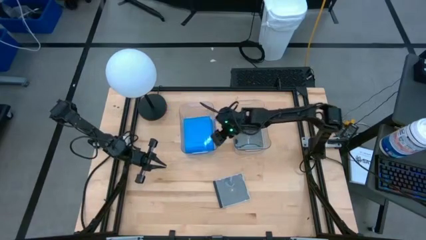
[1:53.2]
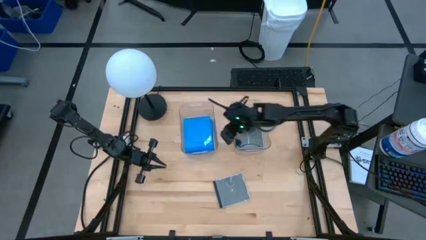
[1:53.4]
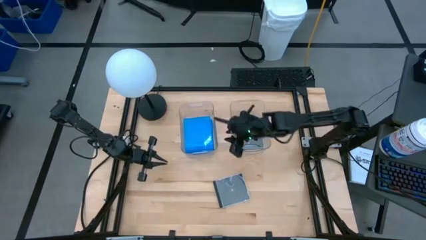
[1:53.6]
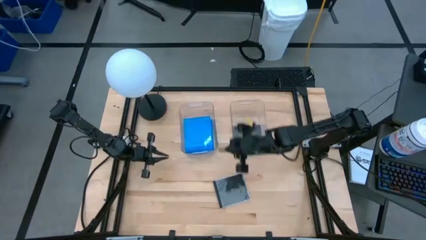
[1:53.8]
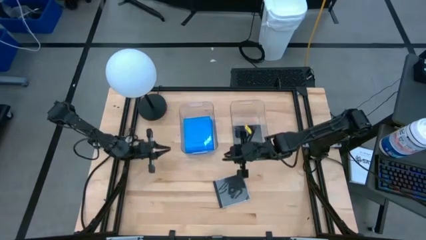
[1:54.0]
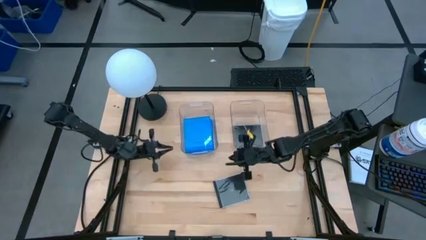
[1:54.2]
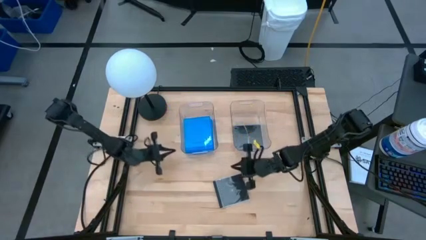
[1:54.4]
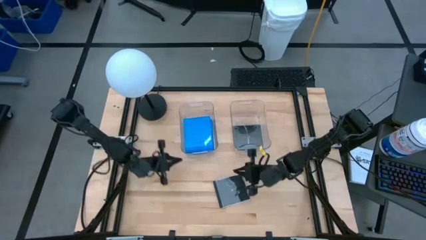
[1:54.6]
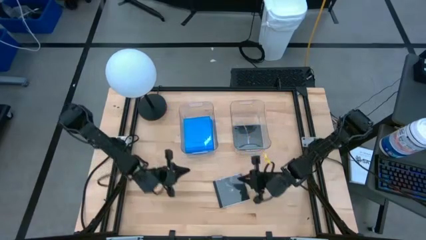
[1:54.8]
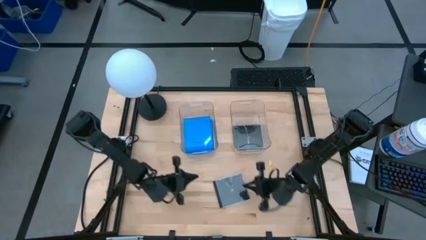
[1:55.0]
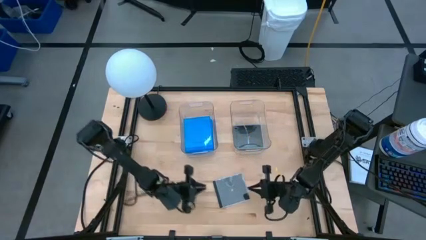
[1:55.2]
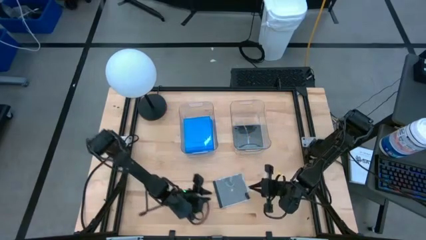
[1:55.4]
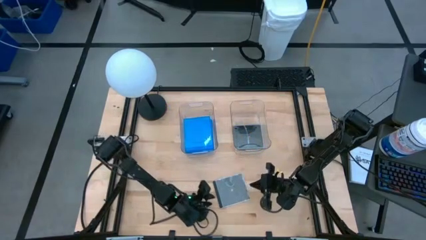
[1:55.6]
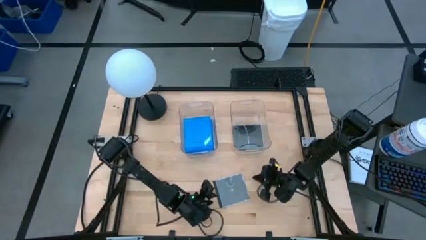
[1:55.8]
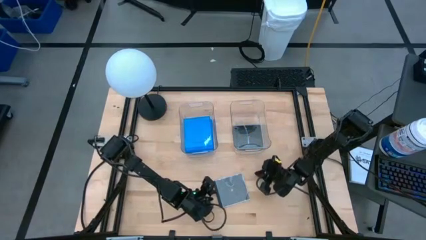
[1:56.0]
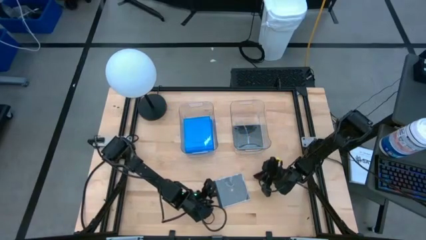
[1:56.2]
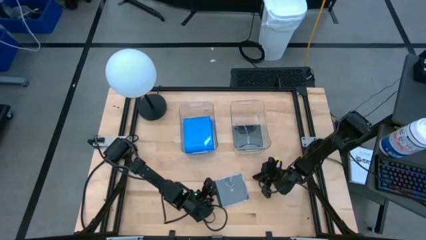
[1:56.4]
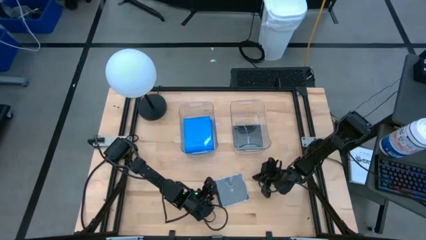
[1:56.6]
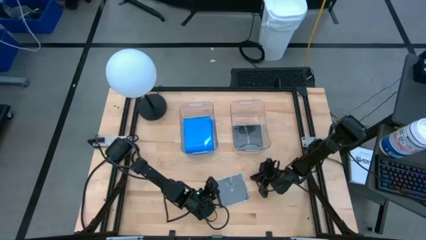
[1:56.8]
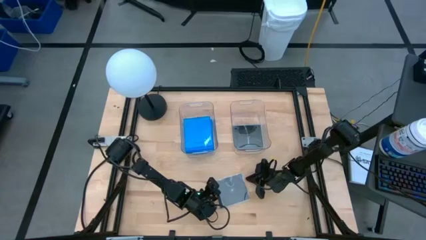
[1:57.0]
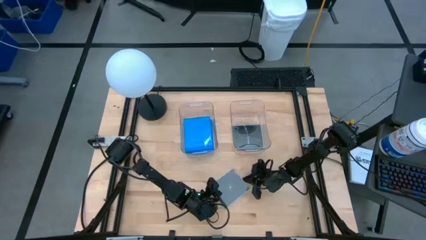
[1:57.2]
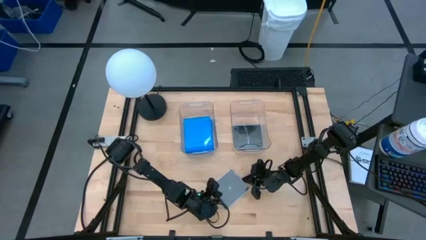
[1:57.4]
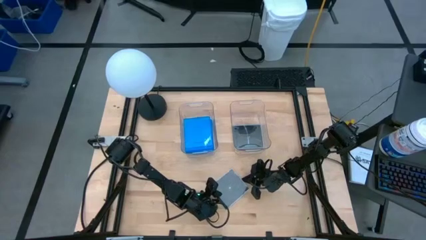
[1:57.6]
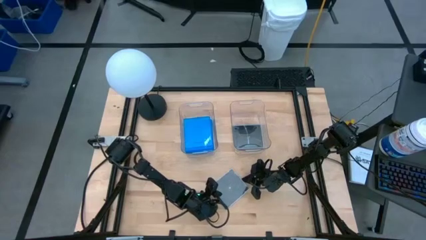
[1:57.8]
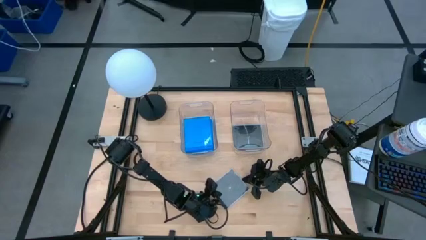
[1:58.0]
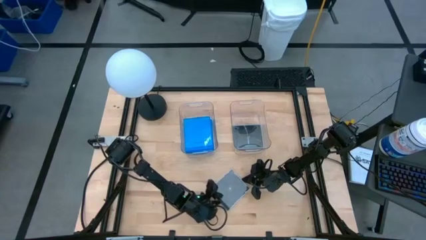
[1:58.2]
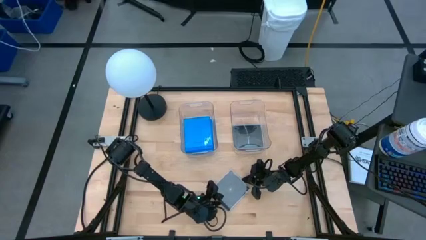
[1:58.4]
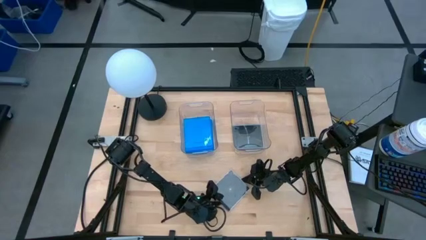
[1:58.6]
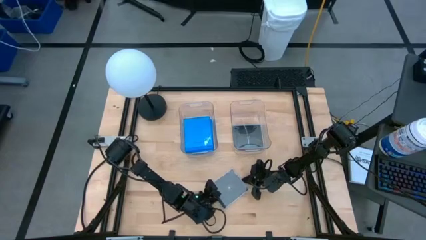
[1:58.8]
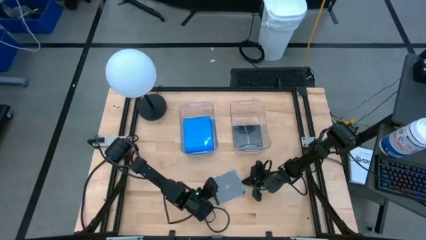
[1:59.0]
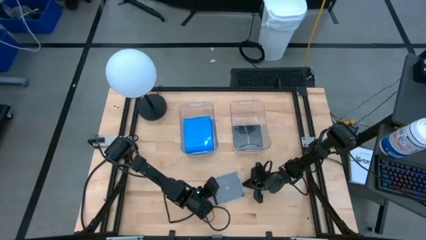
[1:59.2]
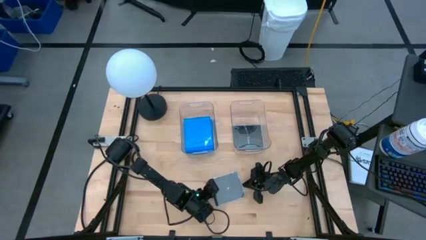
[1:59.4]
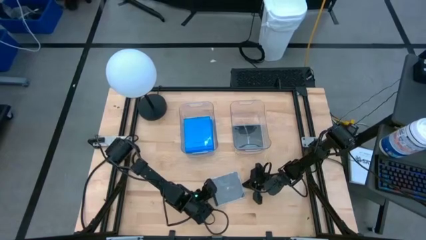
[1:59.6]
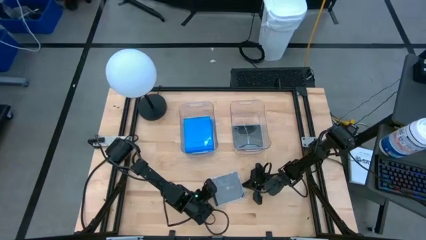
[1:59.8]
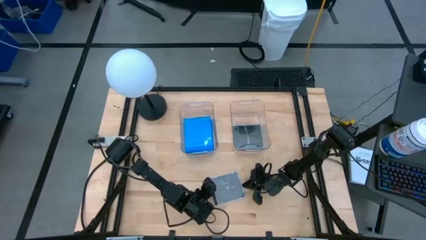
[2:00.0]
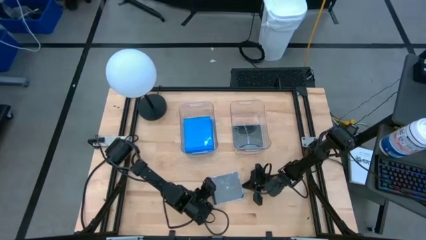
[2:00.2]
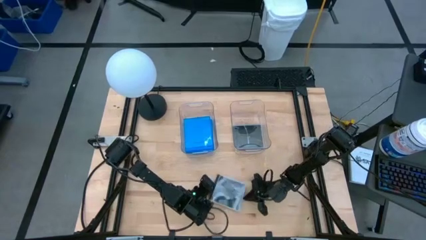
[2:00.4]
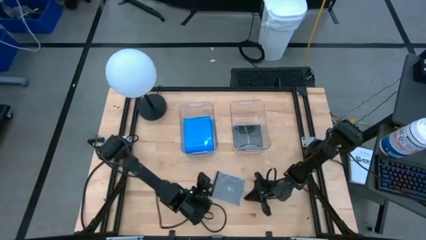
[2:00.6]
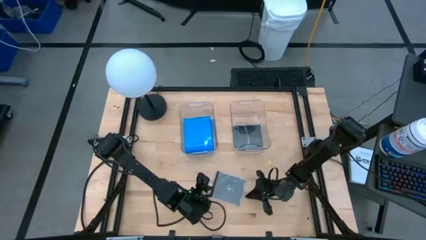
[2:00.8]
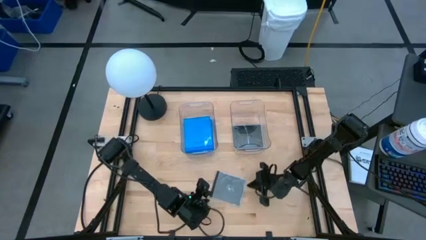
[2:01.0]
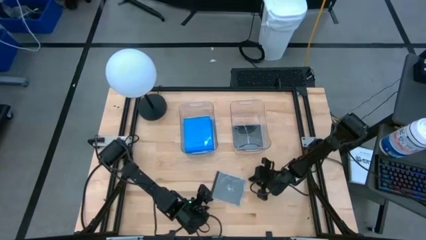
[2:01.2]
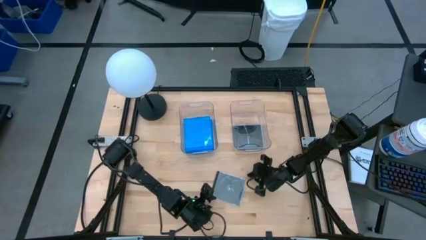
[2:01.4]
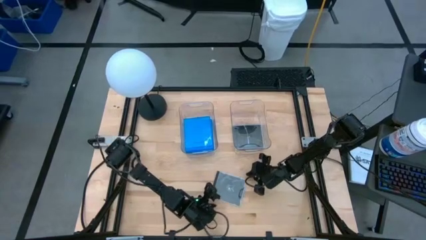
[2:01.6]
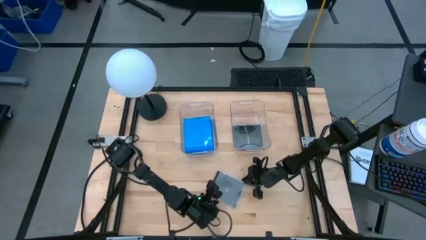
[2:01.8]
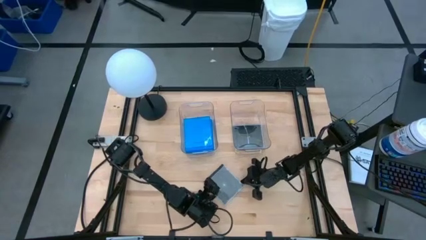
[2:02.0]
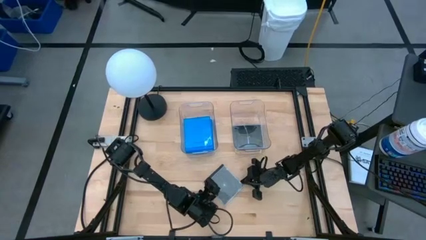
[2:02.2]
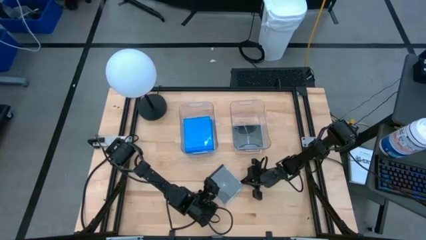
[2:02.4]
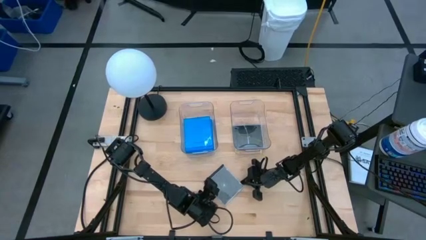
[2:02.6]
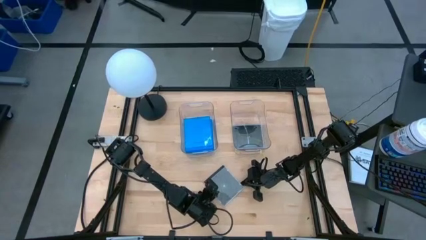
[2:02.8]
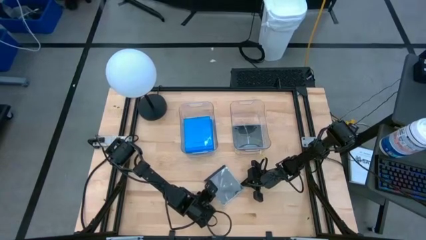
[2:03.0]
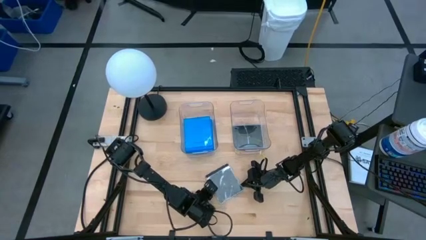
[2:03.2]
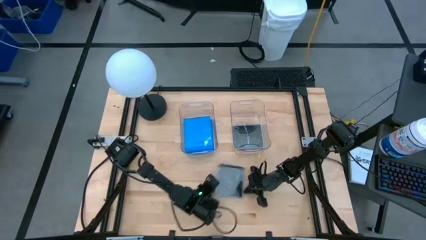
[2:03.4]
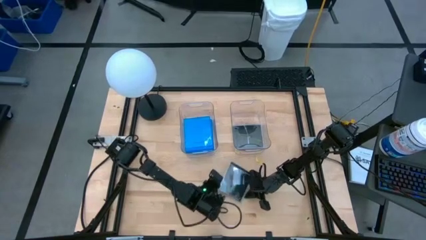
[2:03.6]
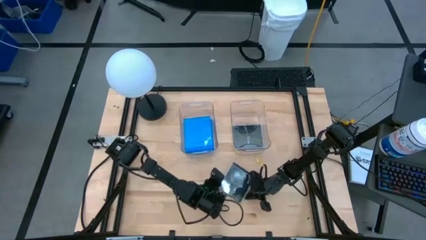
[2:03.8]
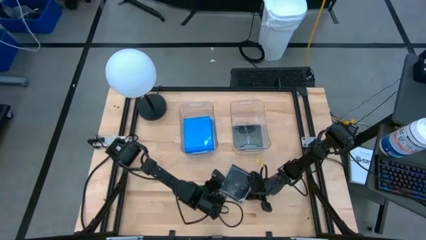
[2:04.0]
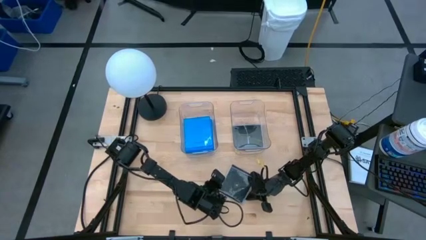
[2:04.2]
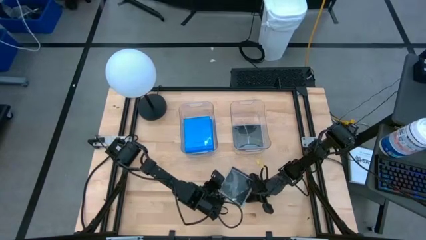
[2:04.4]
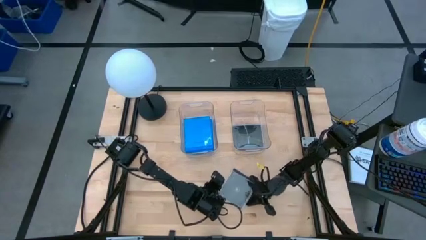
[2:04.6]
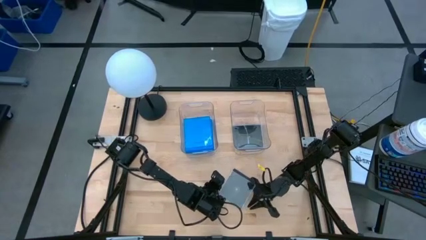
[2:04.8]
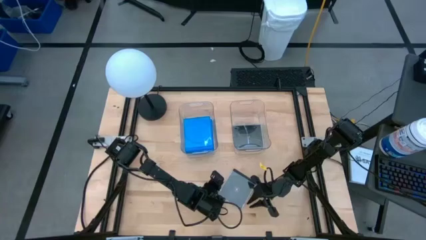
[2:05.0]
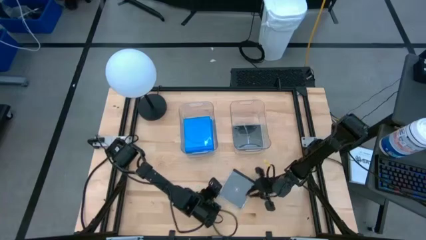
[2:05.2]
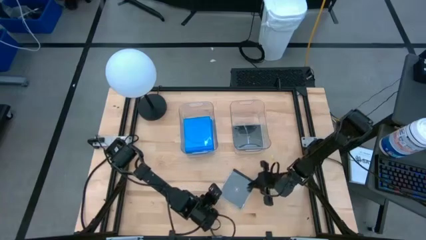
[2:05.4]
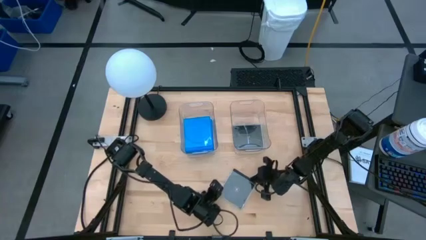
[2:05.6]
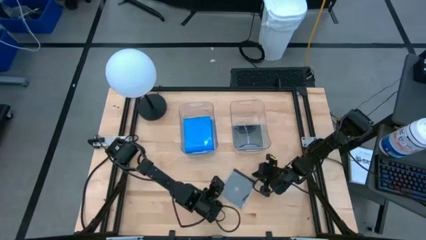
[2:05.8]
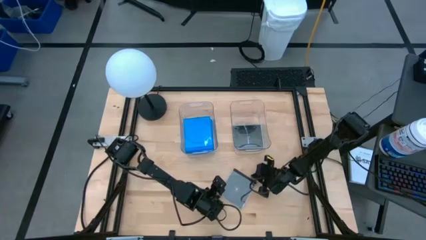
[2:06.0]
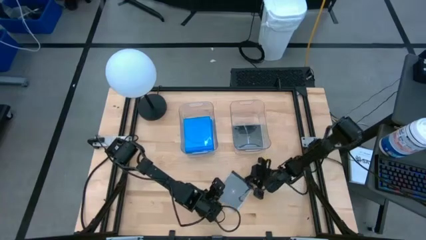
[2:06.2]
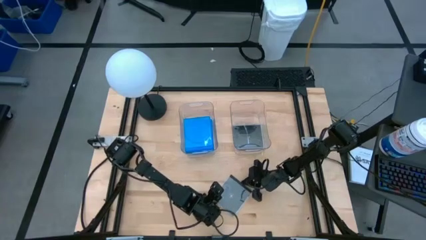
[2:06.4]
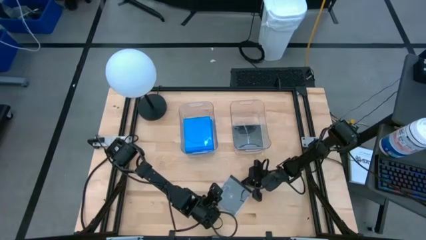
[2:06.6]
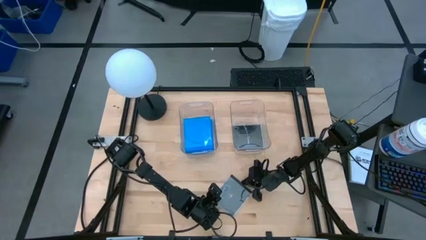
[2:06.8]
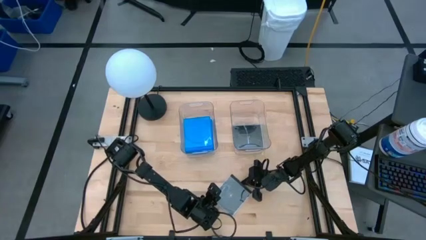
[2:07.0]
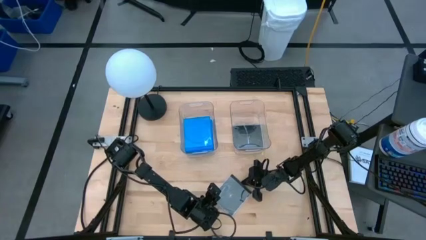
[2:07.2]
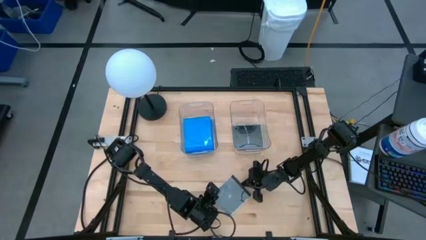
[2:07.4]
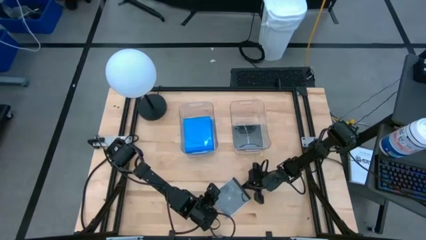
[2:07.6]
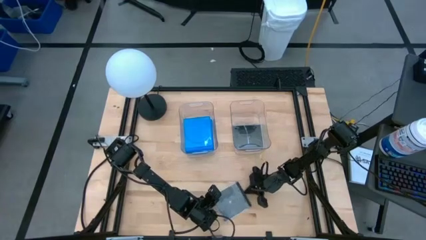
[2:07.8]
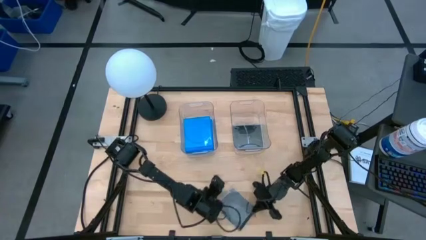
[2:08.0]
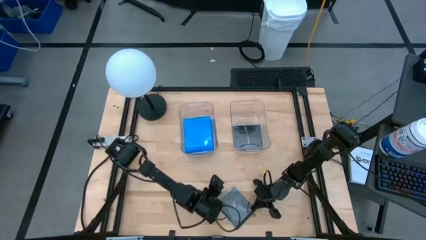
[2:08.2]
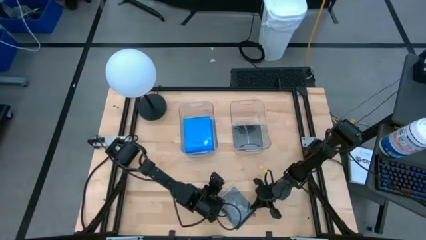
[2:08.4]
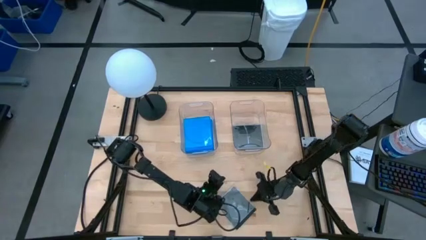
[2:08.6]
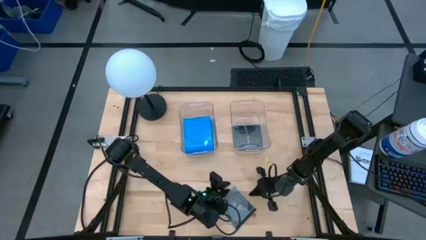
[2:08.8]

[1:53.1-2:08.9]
Task: Pick & place jewel cases by type
Put the black cd case into the right transparent bin

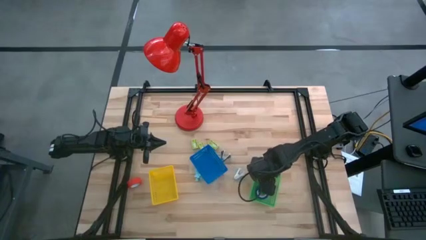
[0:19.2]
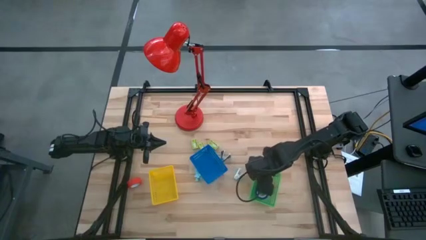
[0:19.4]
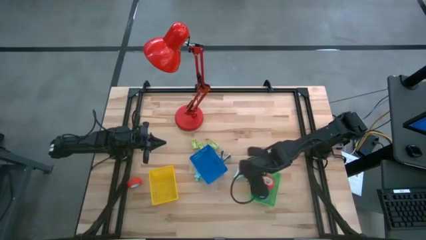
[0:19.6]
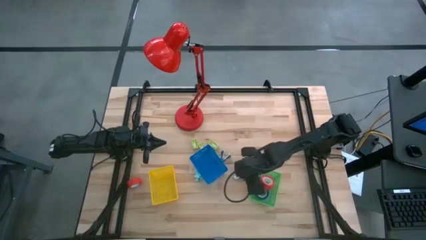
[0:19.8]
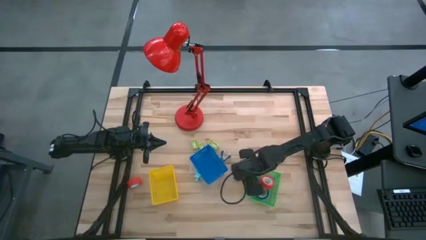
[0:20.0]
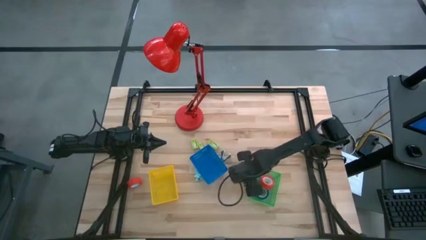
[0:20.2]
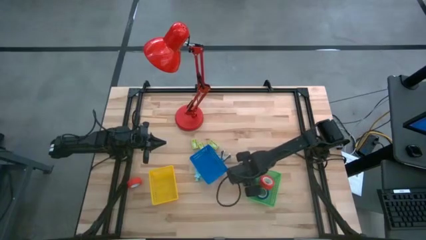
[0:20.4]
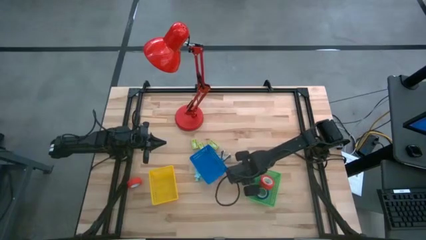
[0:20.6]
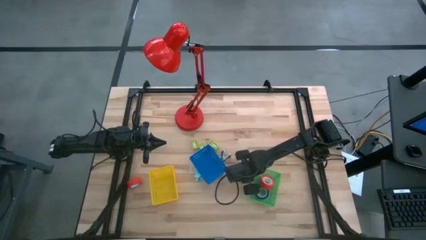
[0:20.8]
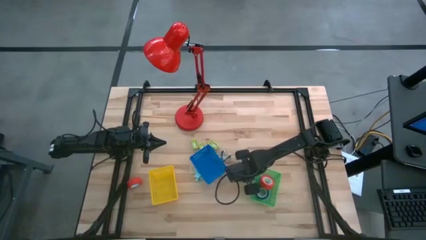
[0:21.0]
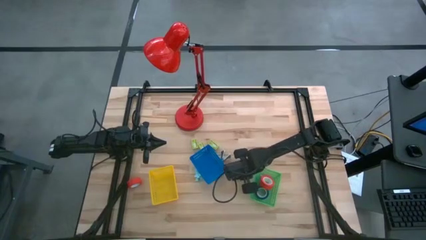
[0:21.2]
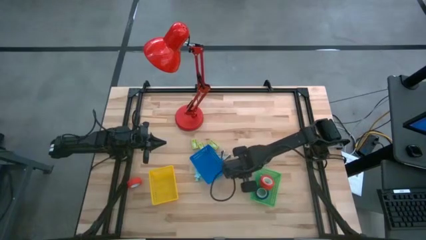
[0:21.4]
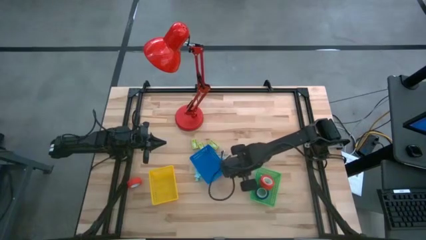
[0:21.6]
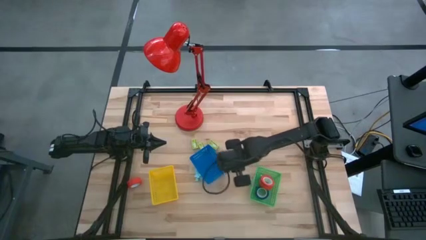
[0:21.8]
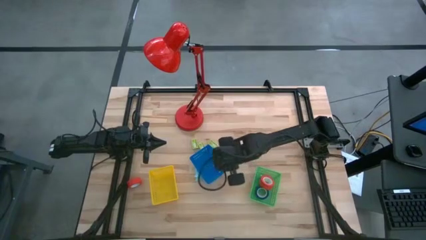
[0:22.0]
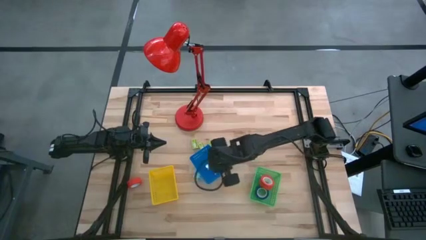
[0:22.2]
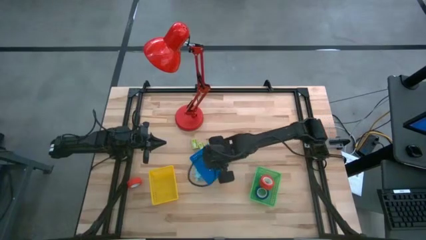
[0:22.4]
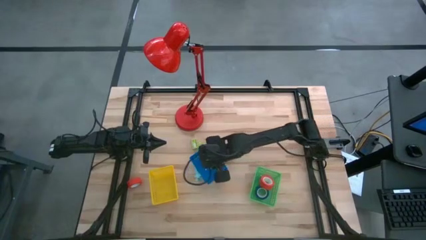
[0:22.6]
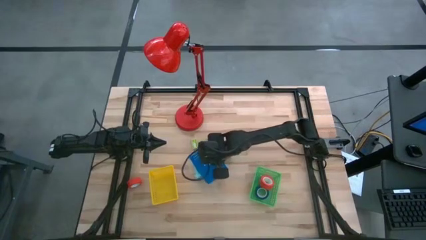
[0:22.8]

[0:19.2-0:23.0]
Task: Pick and place Stapler, Stapler remover, tape
Put the right blue staple remover into the blue bin
